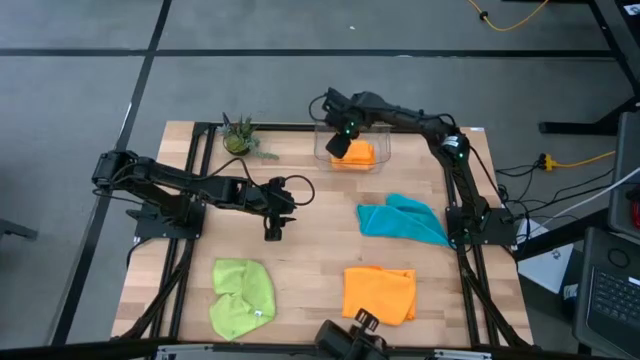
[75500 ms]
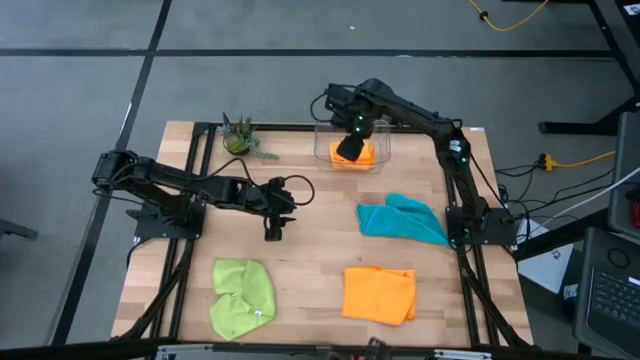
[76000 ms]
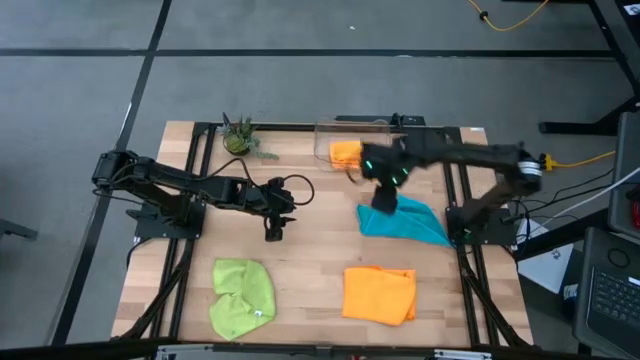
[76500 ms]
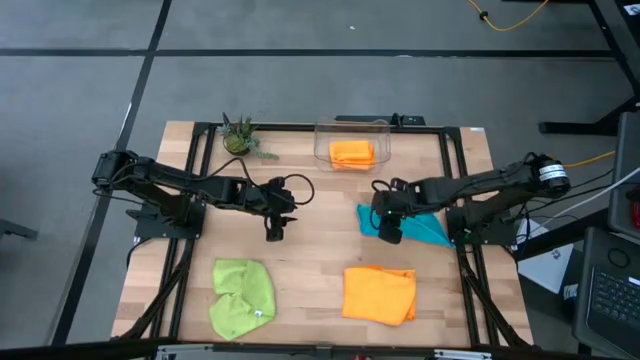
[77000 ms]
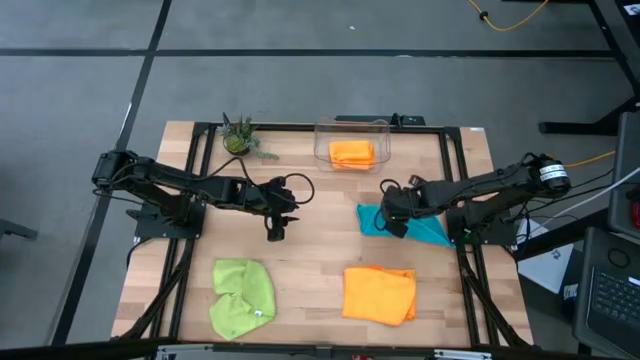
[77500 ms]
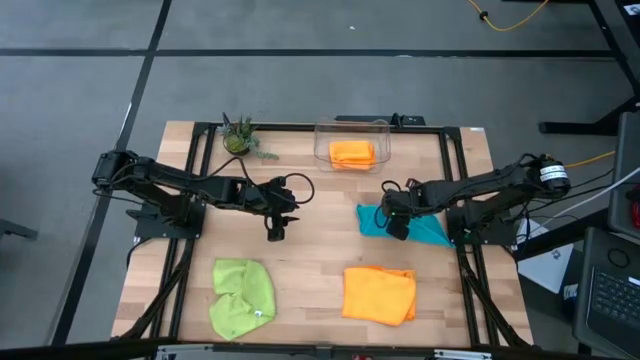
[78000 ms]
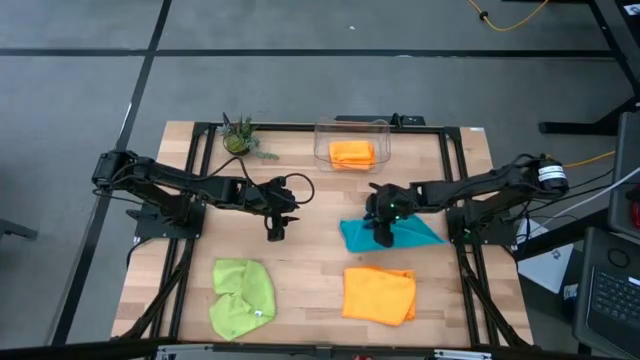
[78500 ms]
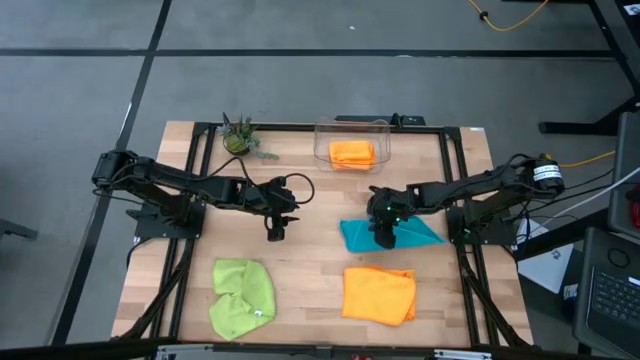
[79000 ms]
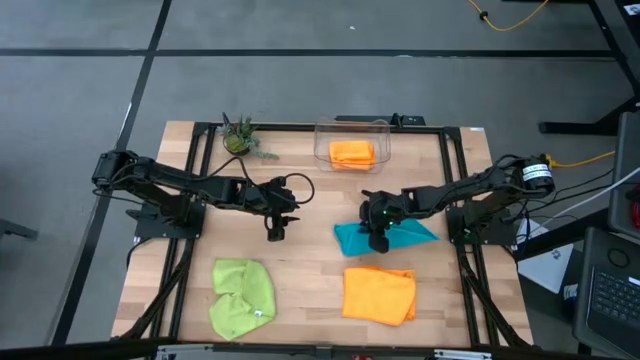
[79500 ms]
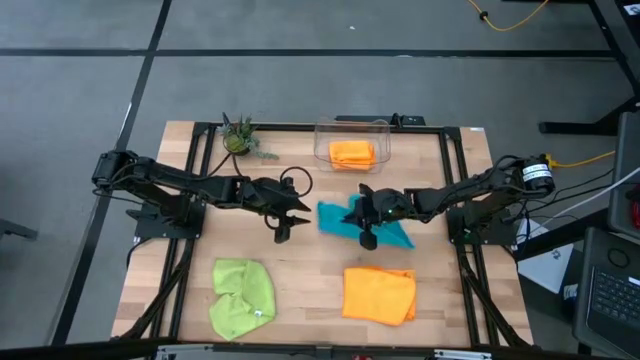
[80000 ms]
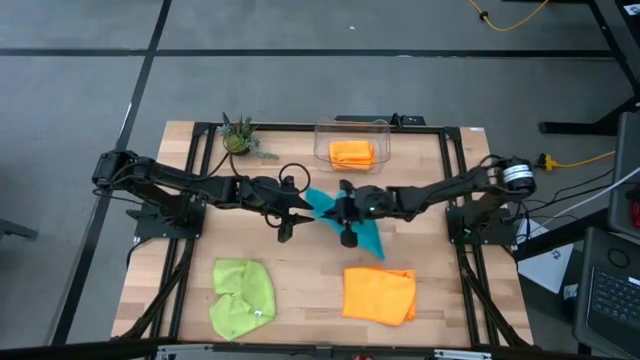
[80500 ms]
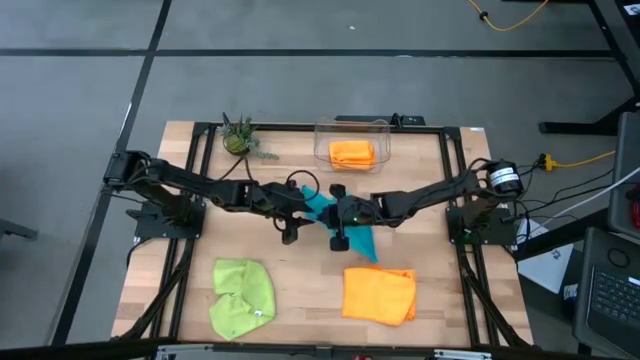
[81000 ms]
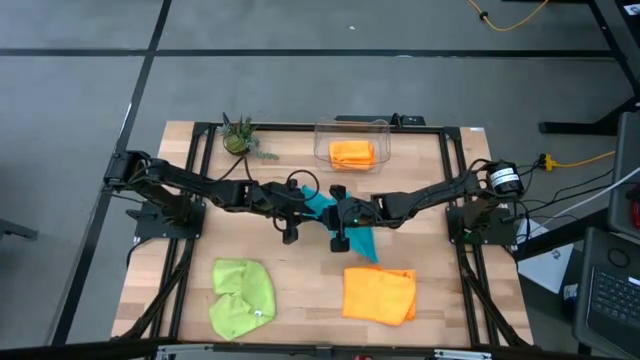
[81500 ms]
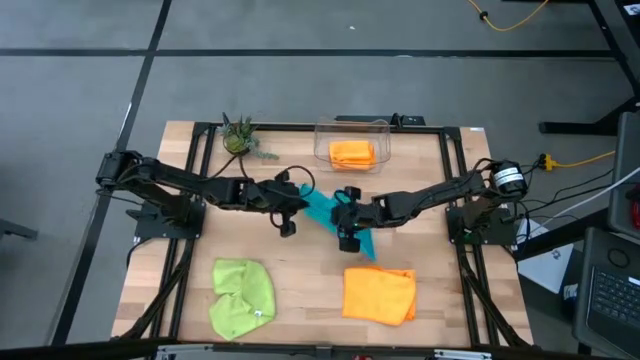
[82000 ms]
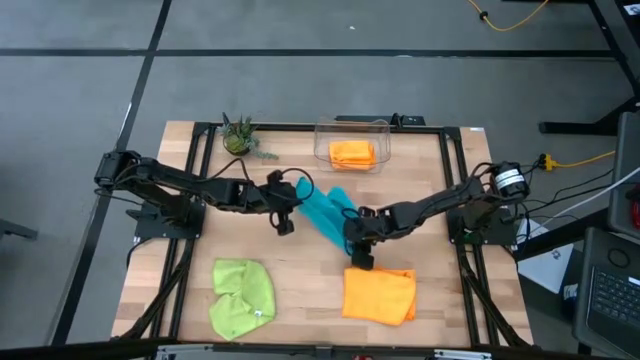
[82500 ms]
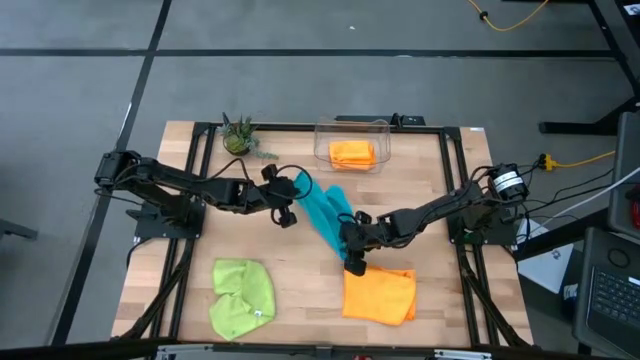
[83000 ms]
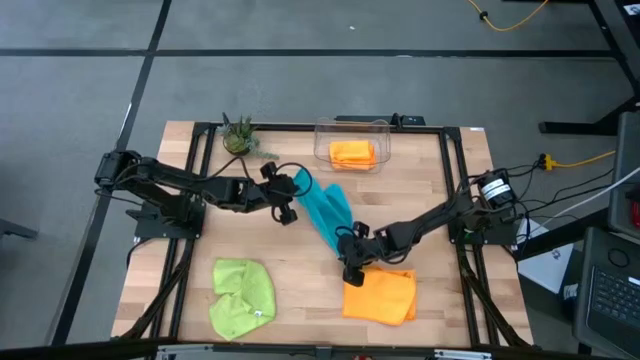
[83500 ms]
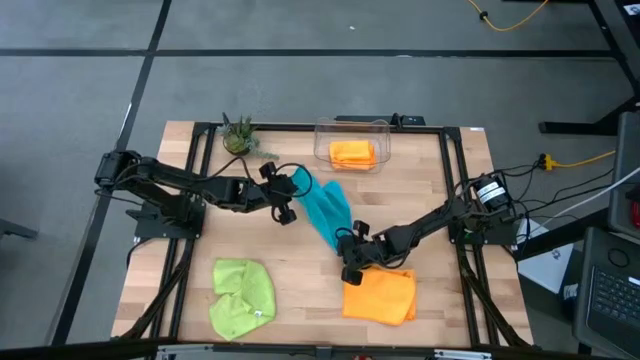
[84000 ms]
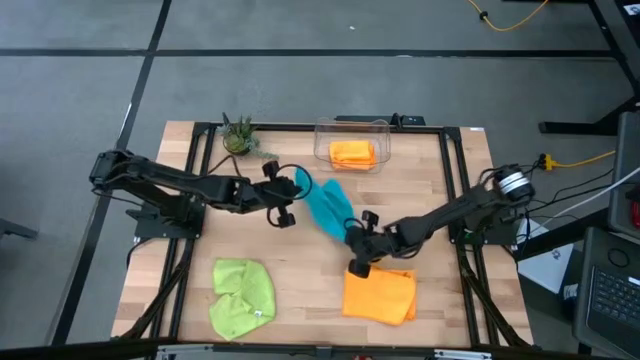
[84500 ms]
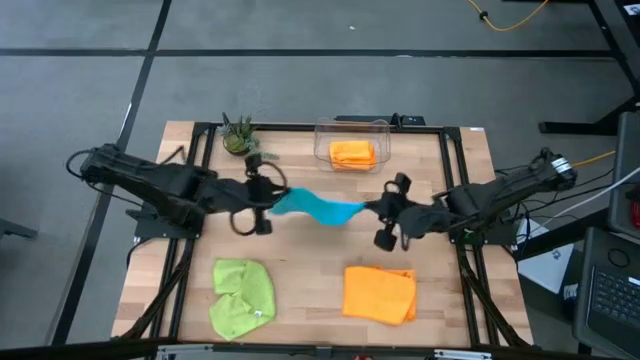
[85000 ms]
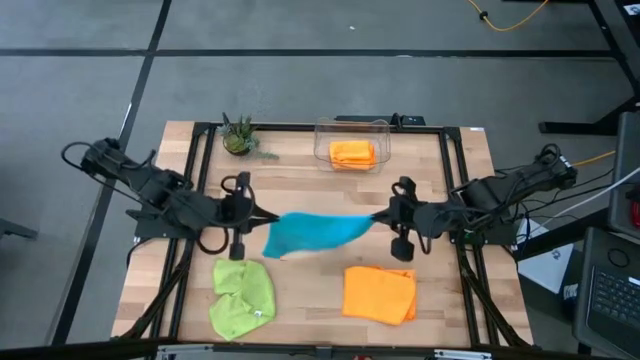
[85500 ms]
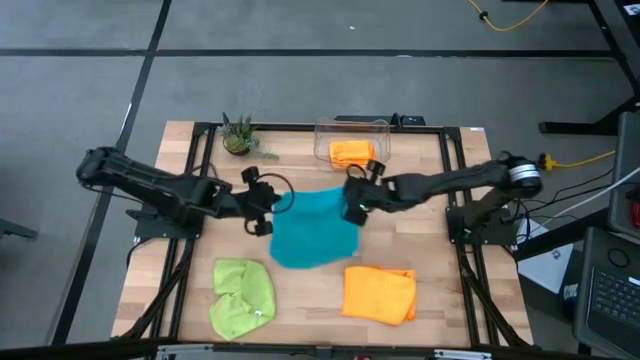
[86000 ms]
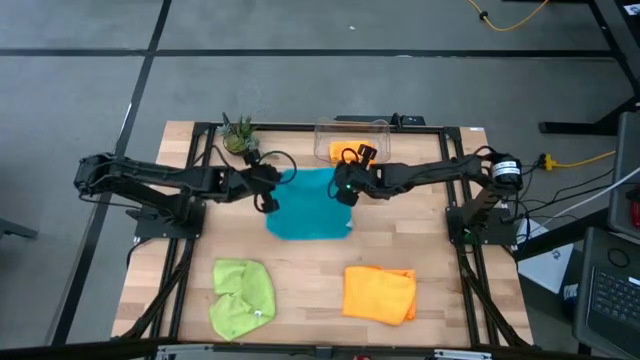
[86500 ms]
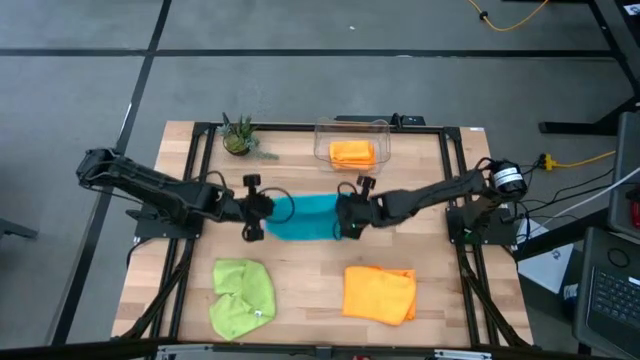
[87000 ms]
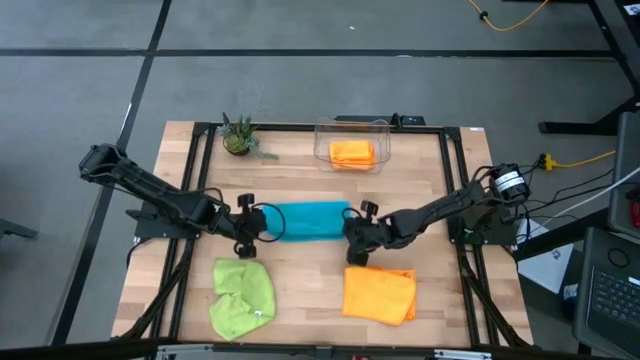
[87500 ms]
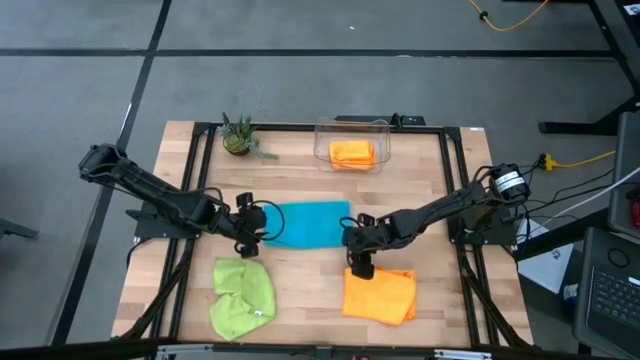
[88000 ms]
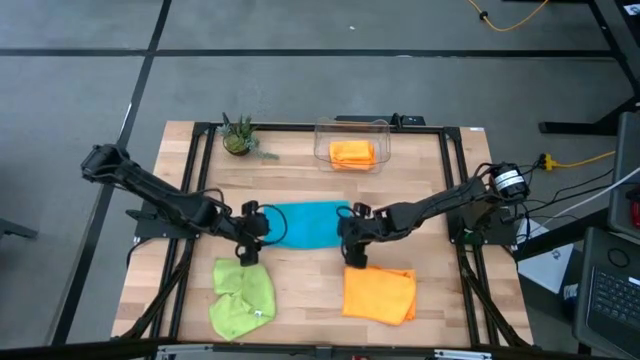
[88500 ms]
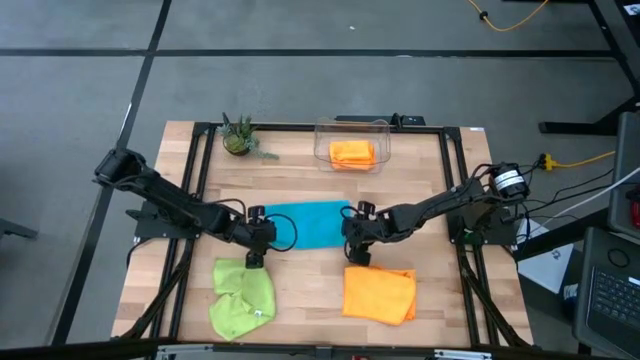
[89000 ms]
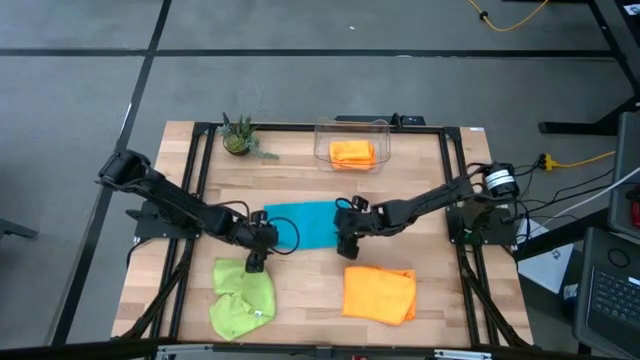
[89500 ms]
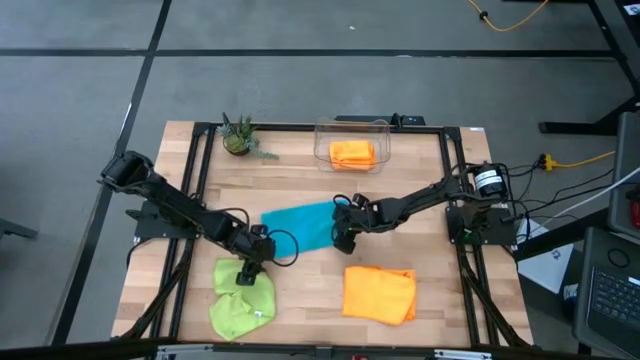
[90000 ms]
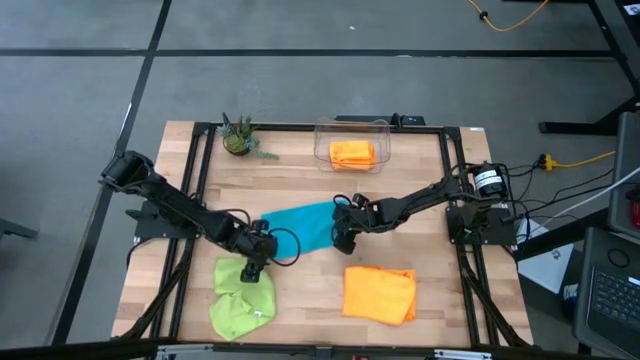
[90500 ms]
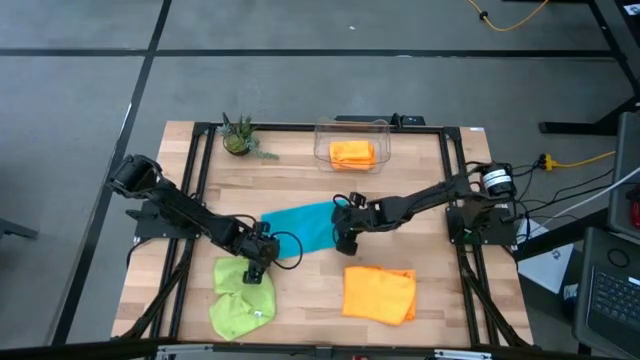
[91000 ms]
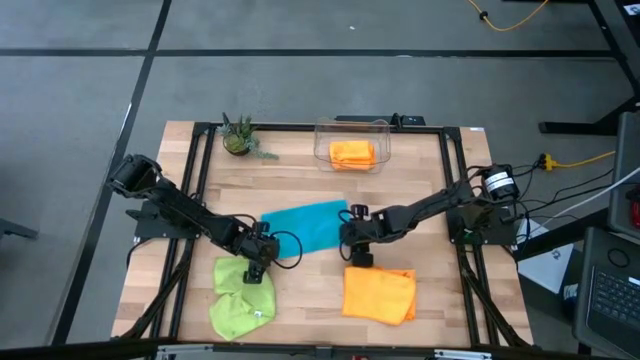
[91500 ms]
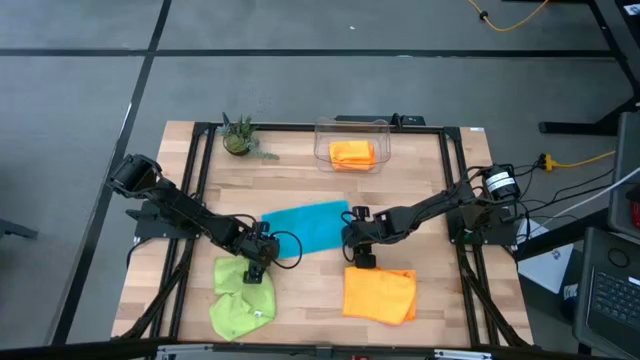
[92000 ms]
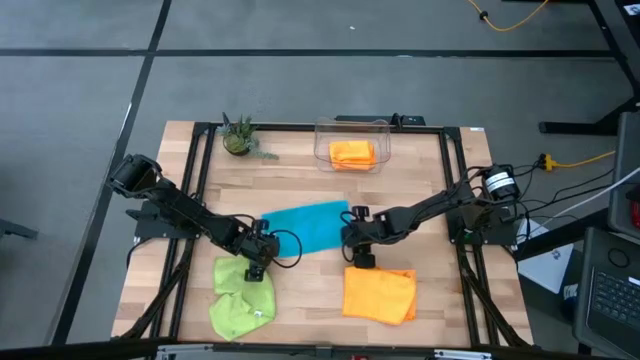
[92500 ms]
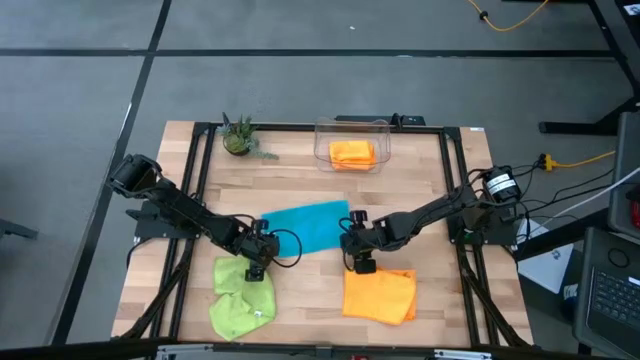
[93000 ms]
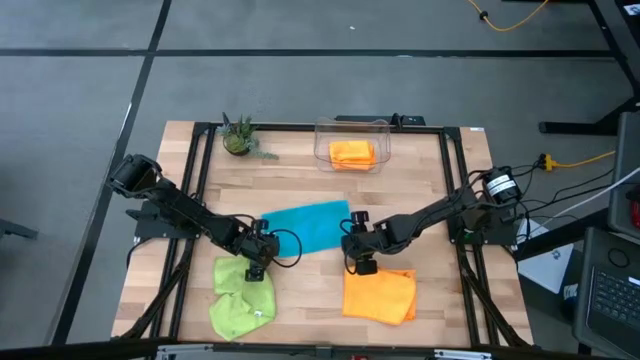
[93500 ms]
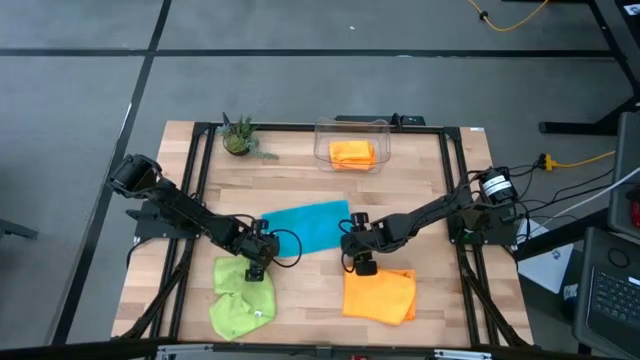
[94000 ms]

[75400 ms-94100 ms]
Task: Fold microfiber towels
Fold the blue towel on the table

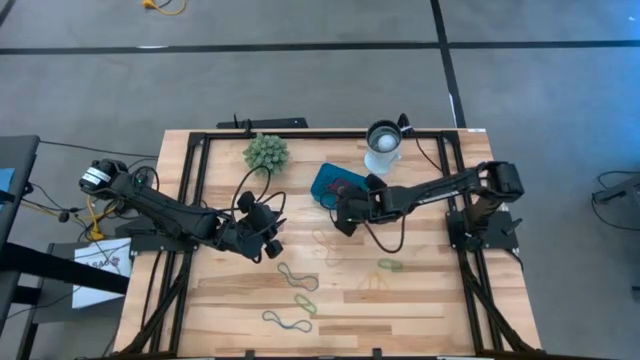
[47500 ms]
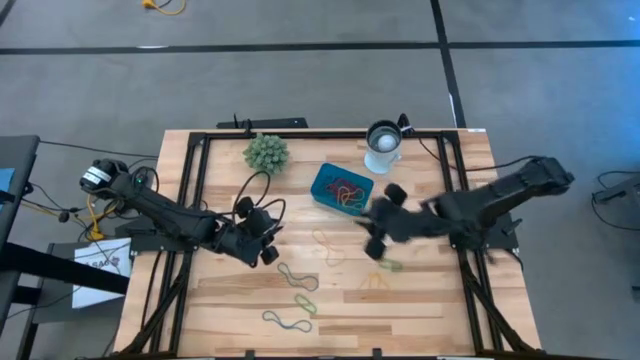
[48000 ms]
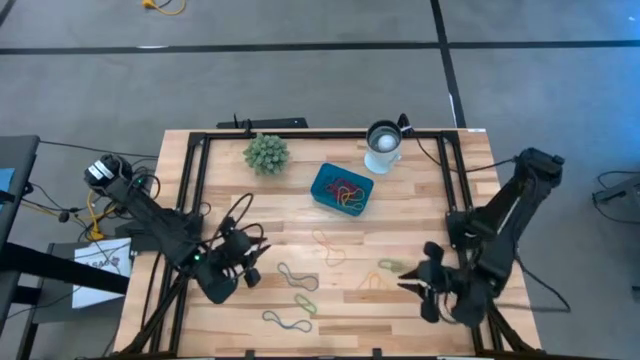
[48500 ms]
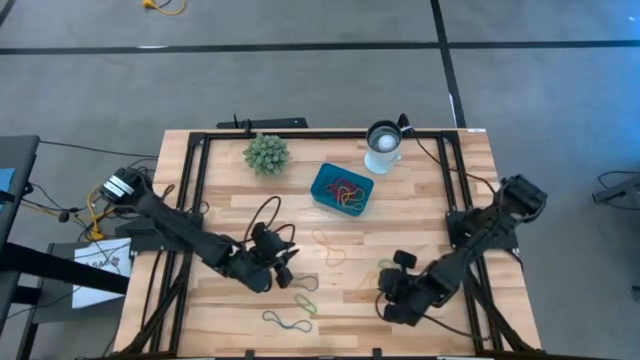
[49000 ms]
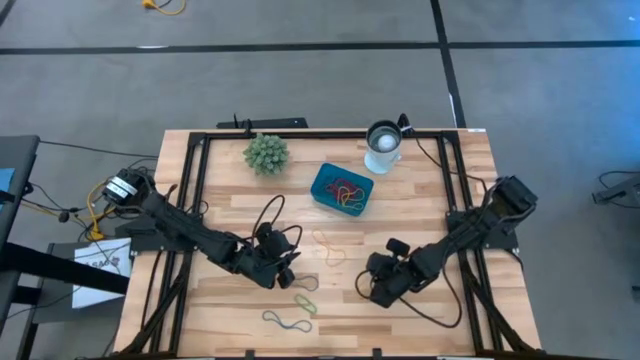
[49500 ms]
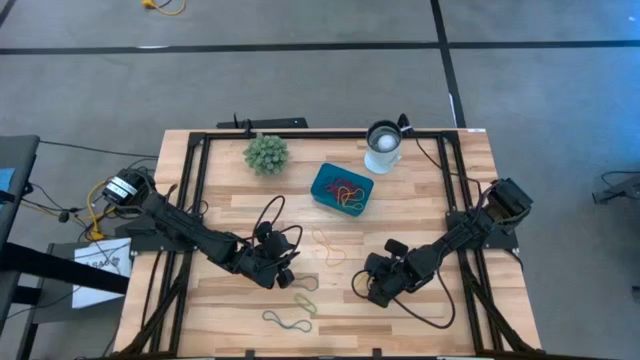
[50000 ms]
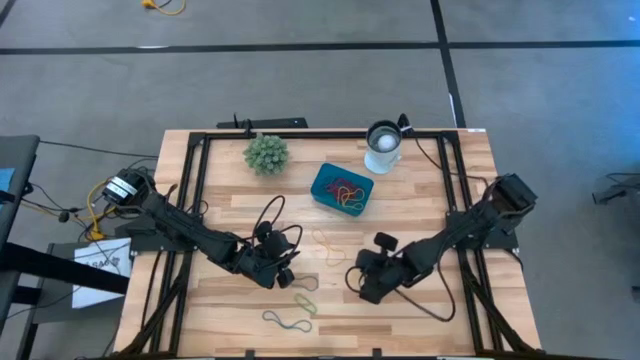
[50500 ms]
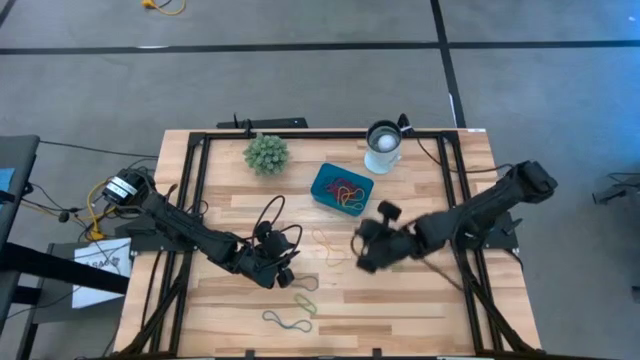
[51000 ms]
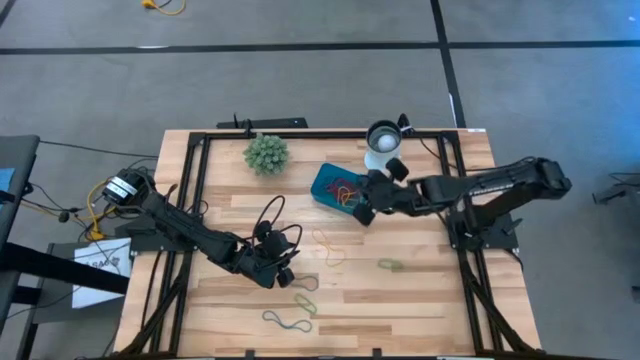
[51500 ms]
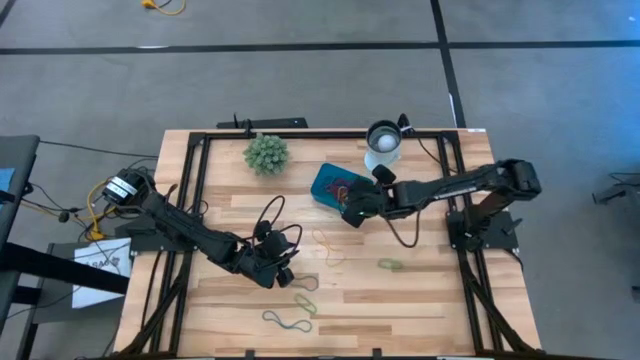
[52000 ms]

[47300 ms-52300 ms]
Task: Pick and place items into bin
Put the yellow rubber band into the blue bin
